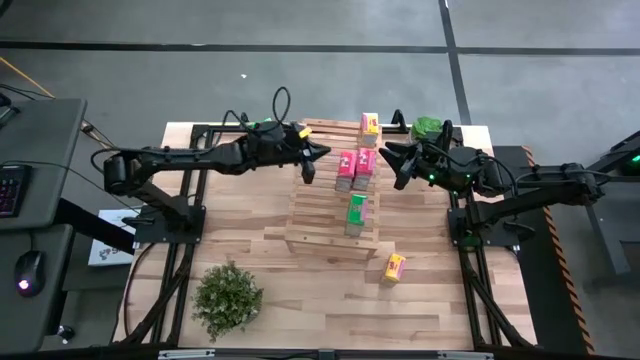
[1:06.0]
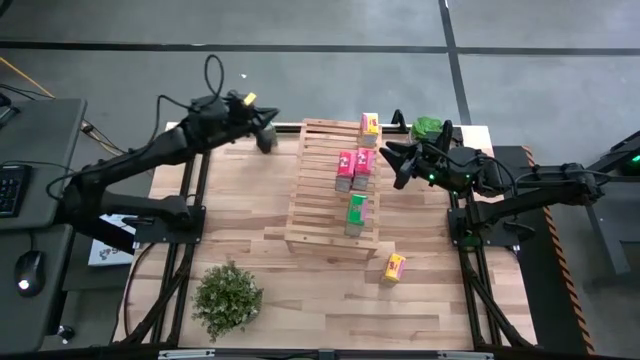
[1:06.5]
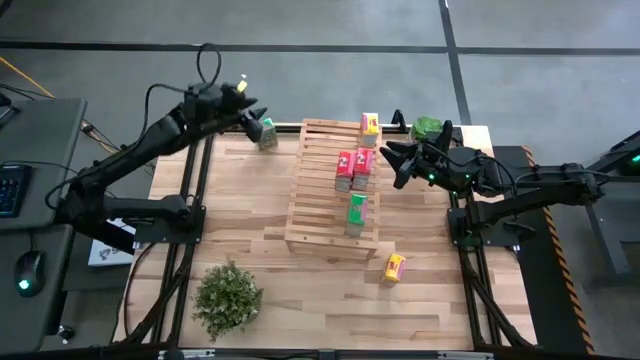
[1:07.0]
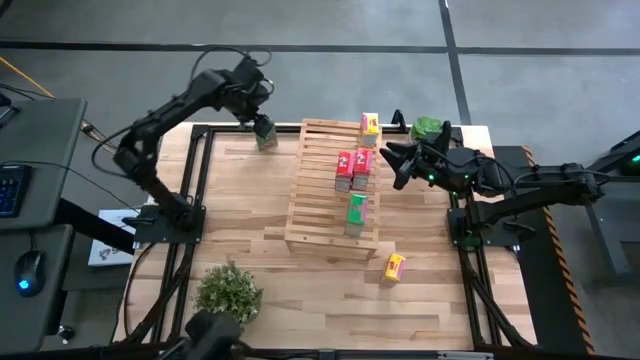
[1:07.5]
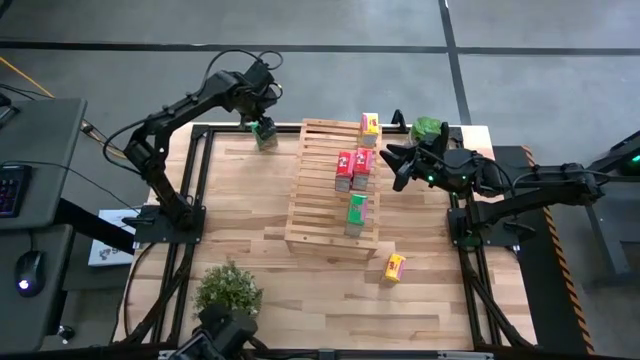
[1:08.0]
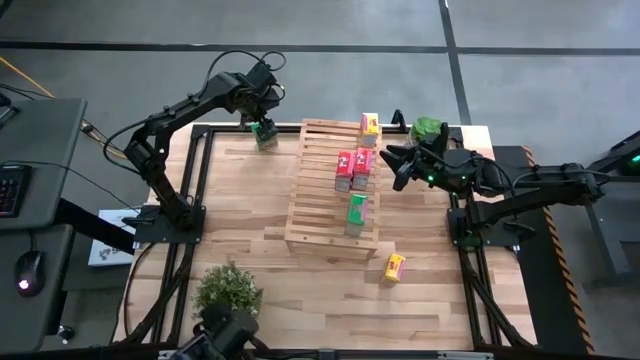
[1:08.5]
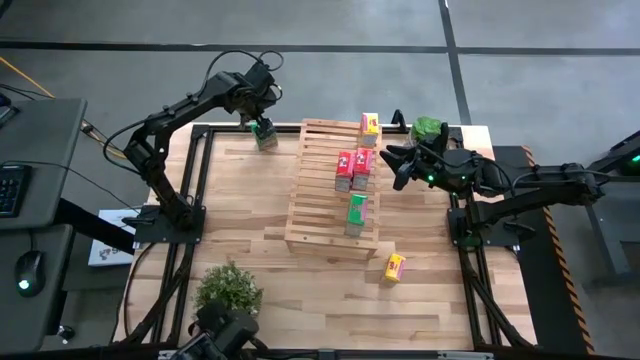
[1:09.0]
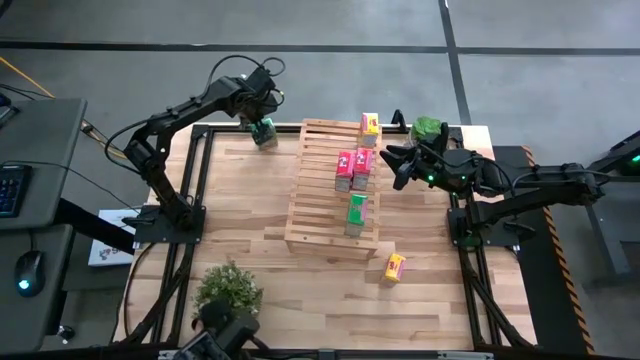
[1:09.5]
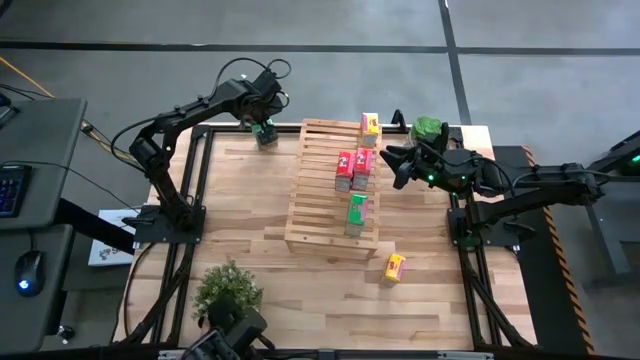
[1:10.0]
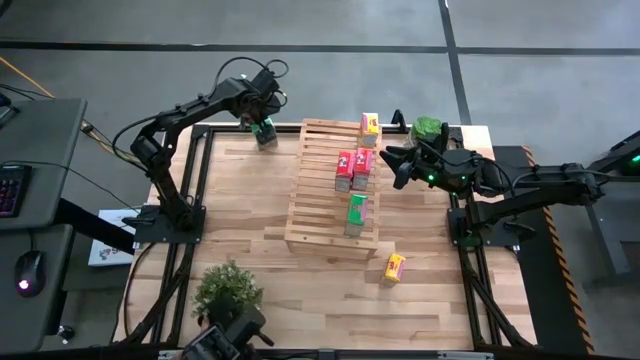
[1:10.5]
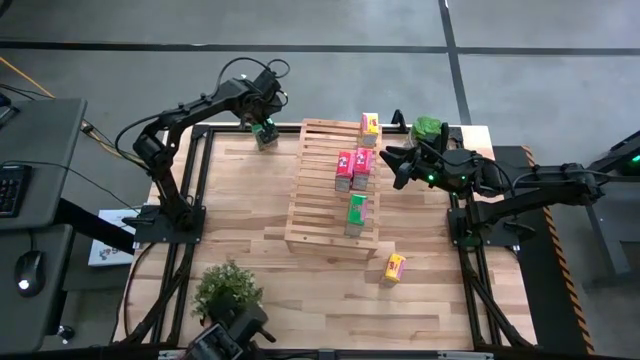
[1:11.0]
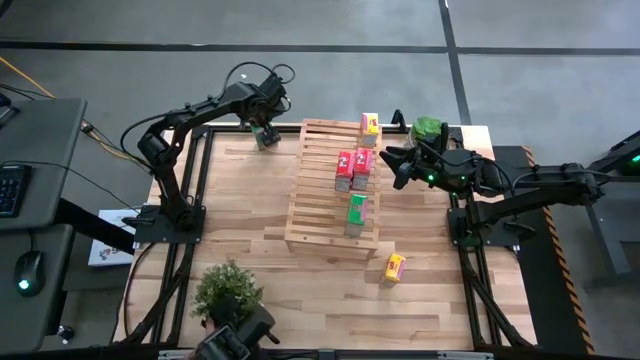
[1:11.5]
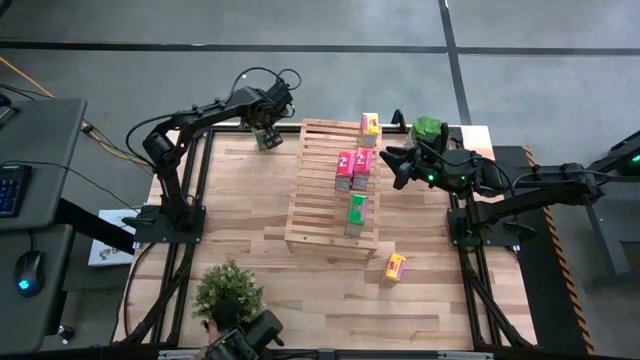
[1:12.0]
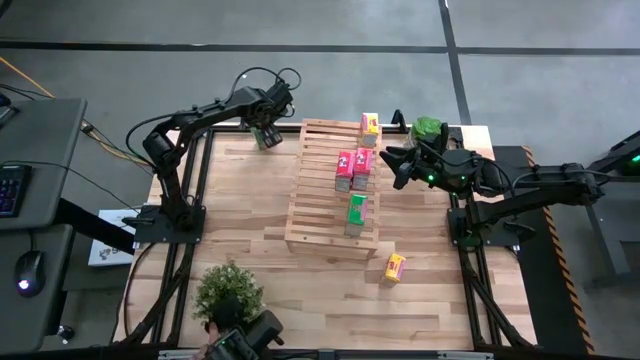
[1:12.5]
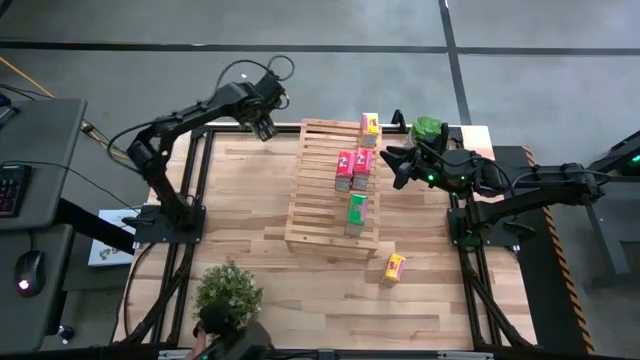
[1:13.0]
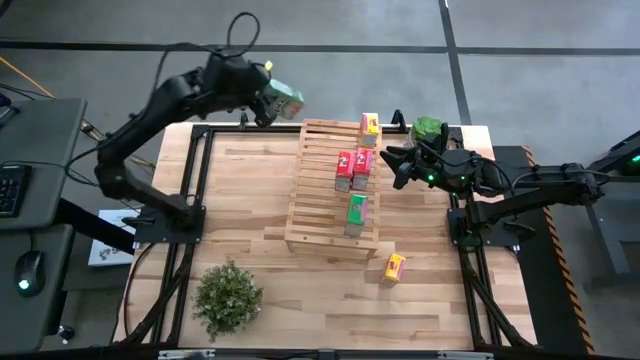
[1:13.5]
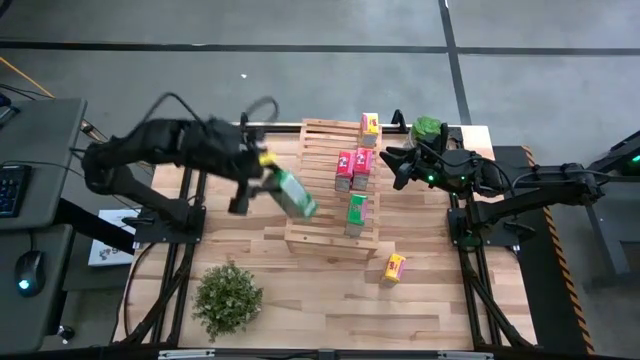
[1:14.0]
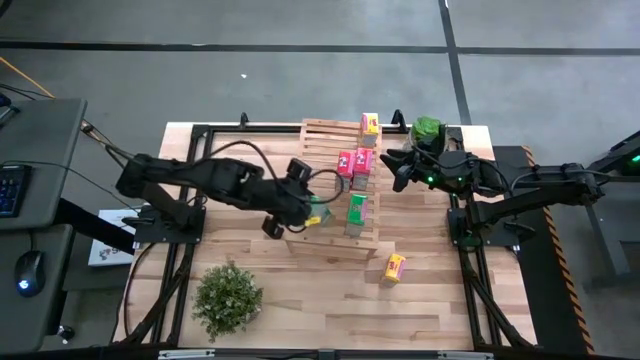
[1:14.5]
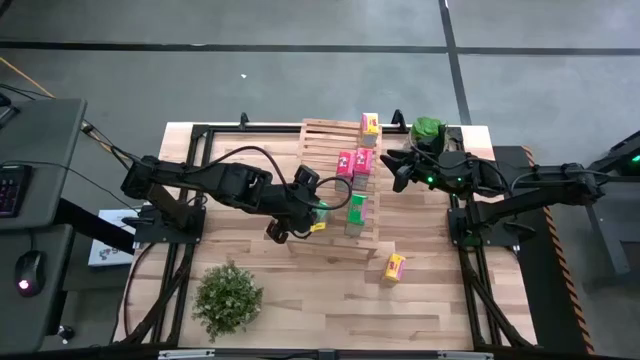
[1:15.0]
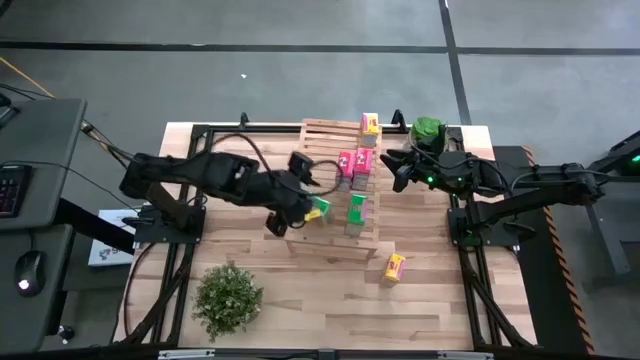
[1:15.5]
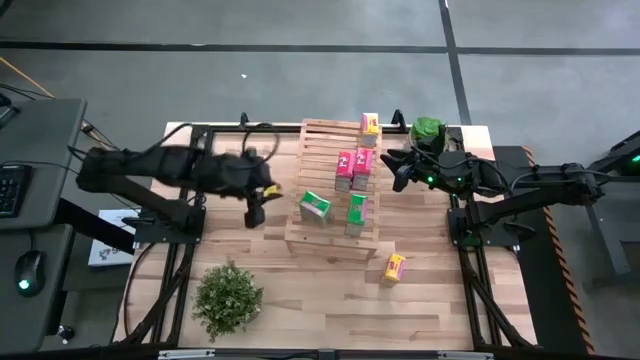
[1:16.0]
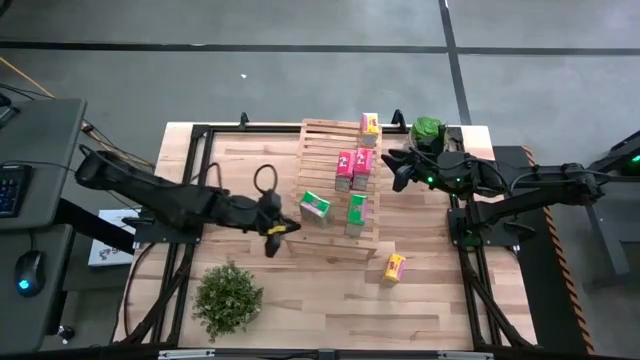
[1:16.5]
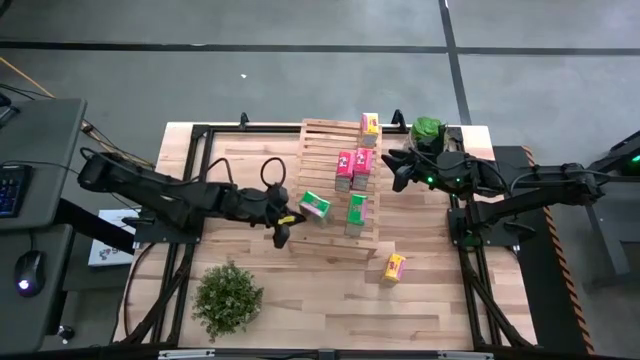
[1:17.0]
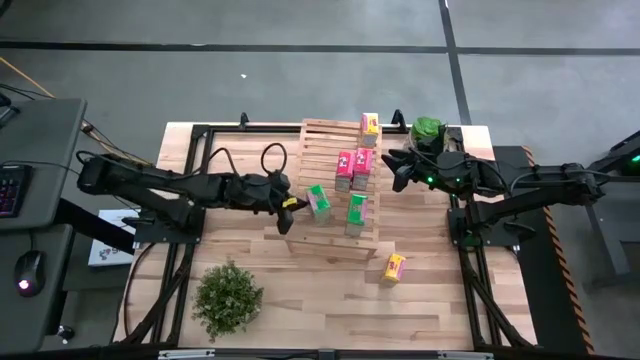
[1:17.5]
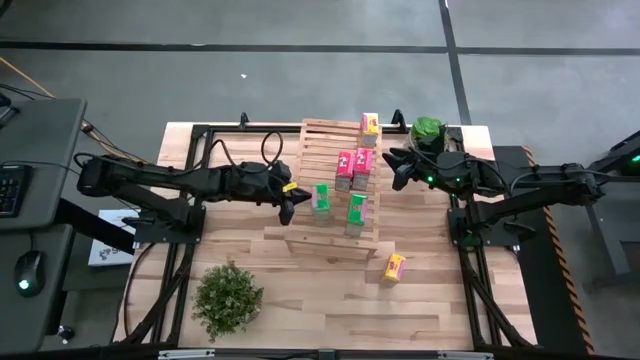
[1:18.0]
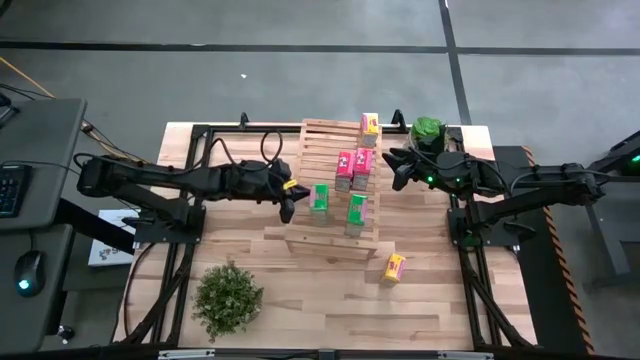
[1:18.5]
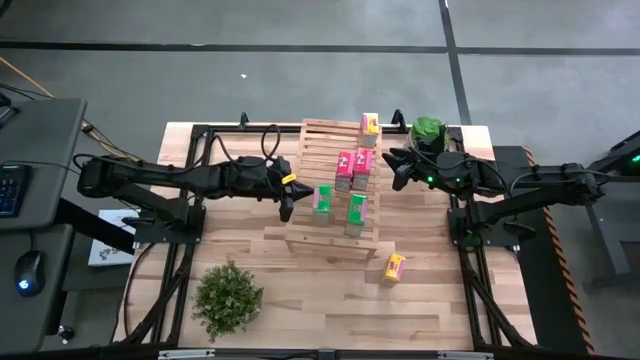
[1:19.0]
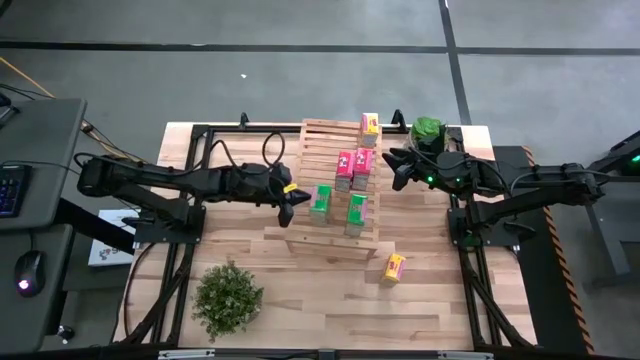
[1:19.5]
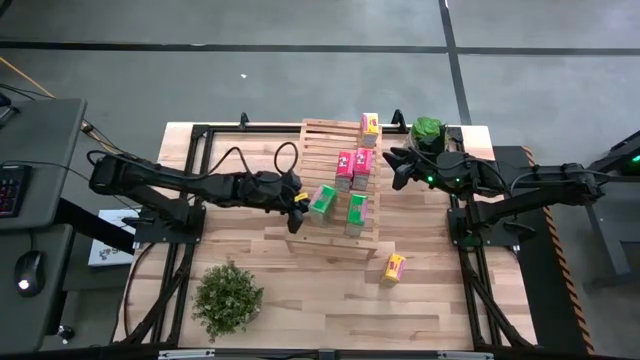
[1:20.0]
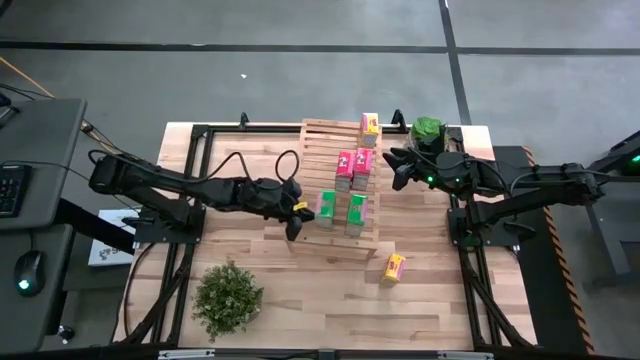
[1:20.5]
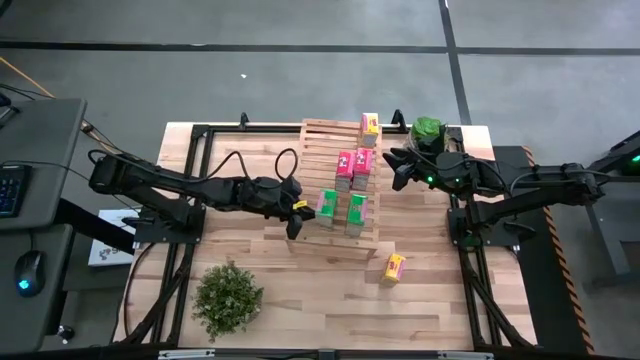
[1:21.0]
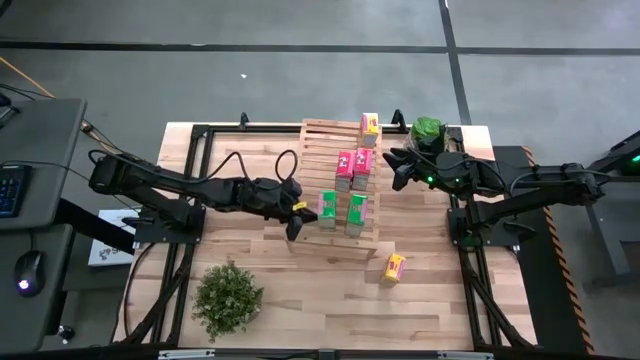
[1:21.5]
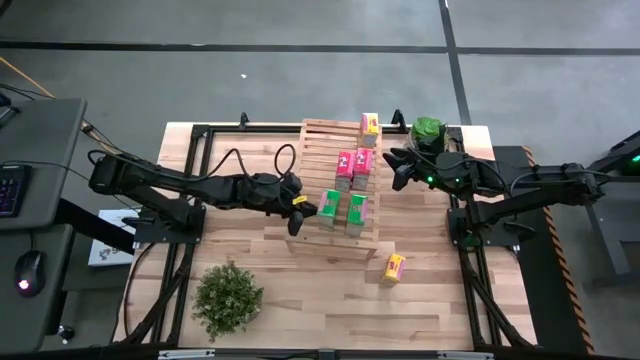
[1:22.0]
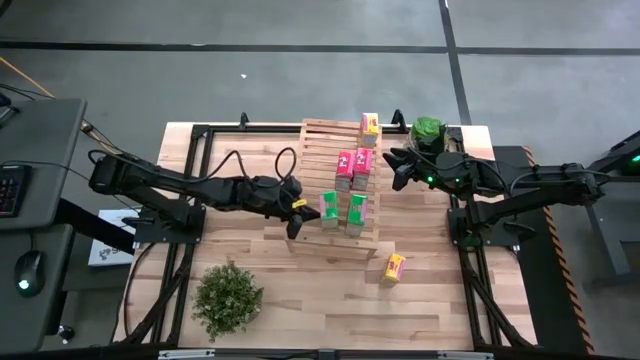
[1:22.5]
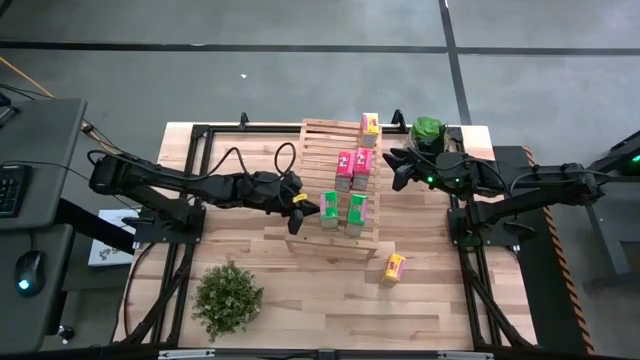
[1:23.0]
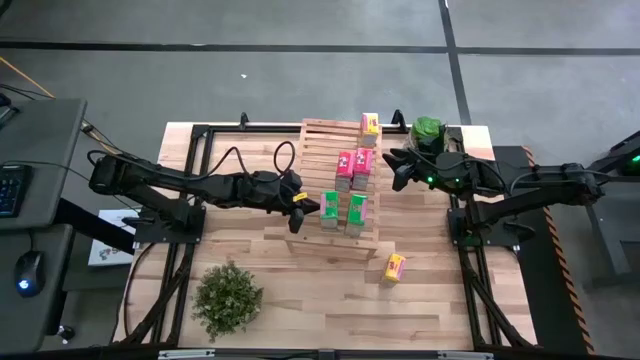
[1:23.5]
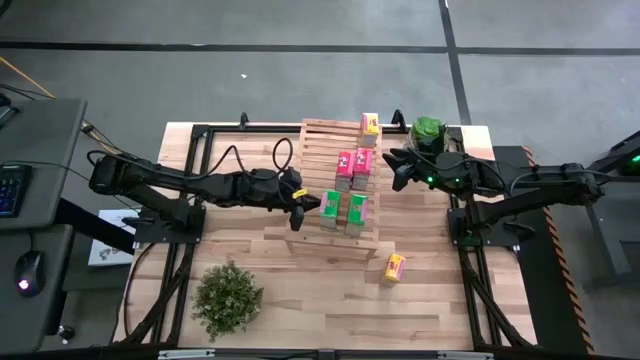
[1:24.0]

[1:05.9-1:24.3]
Task: Stack cereal on shelf
Put the green cereal box on the shelf aligned with other green cereal box

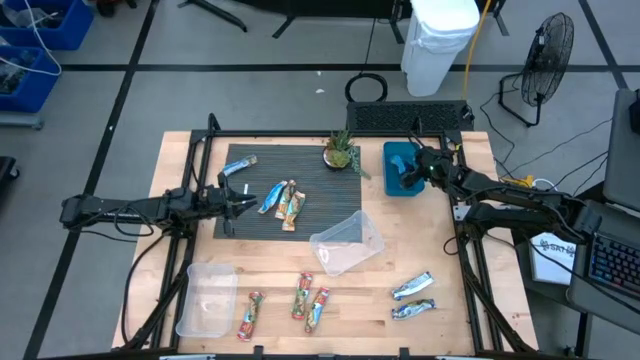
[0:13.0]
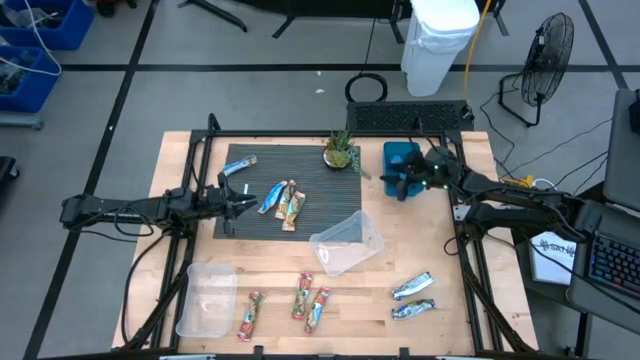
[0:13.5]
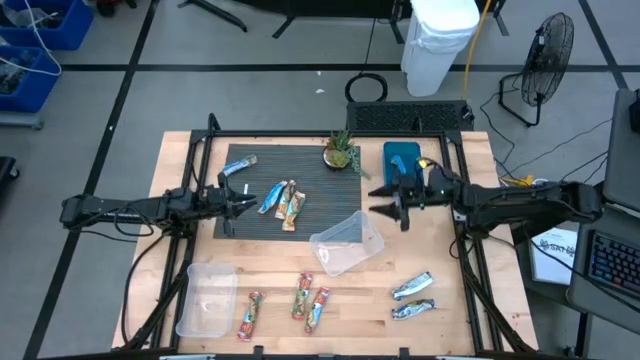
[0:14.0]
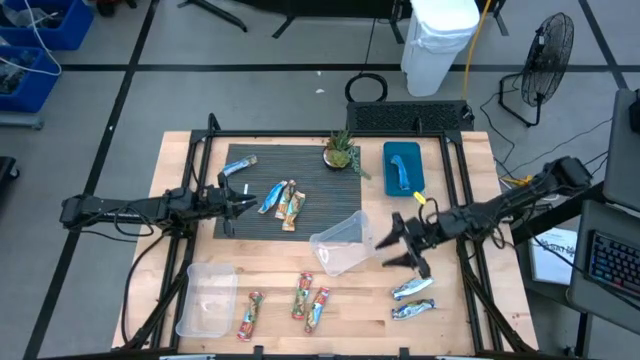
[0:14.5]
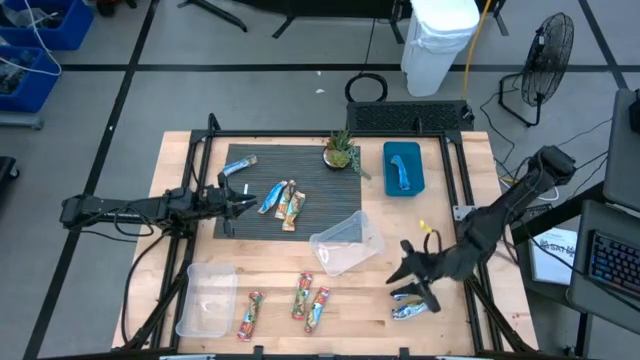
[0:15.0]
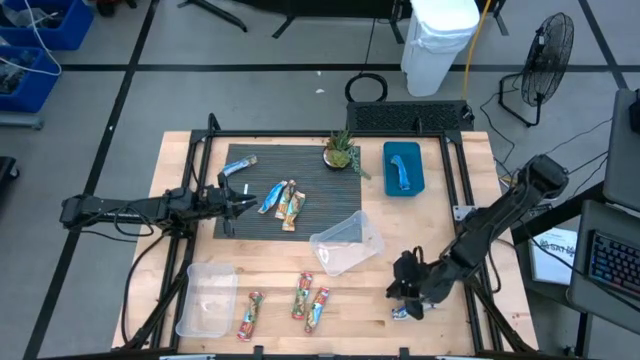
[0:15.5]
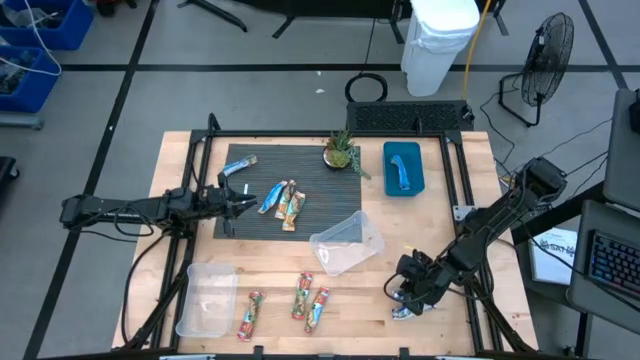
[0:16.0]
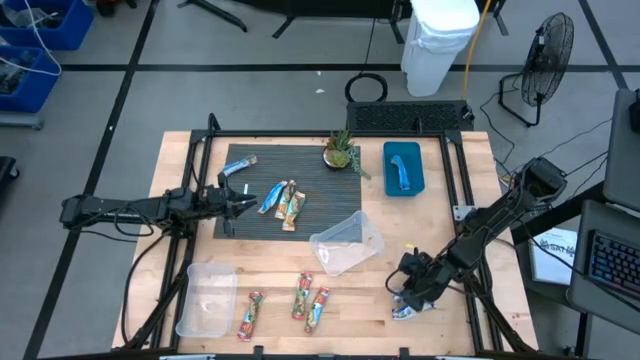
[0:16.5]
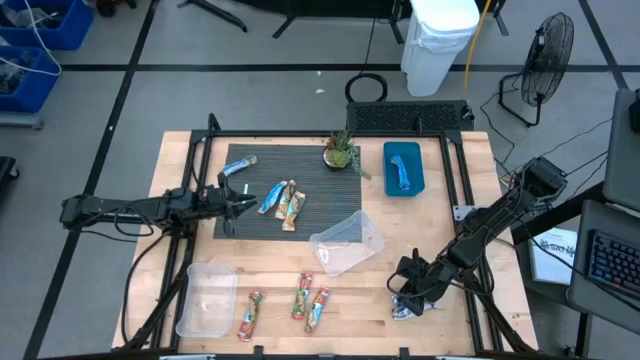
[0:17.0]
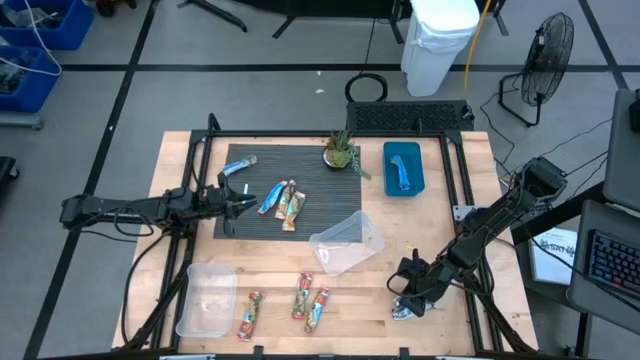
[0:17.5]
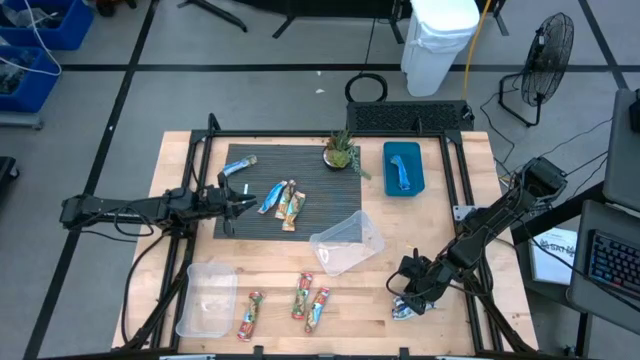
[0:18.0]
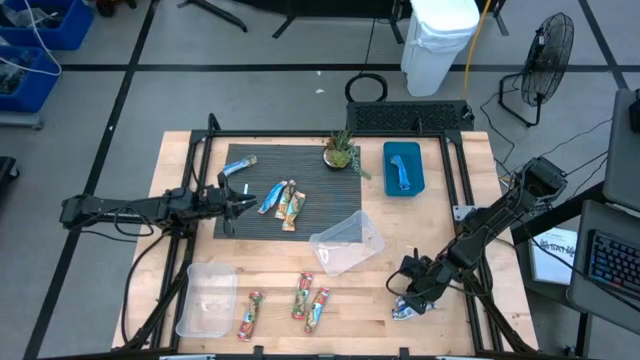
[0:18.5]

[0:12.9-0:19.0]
Task: Pick and place Granola Bars by type
Put the top blue granola bar into the blue bin
